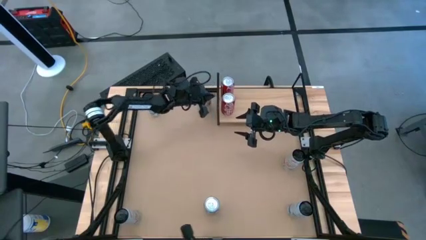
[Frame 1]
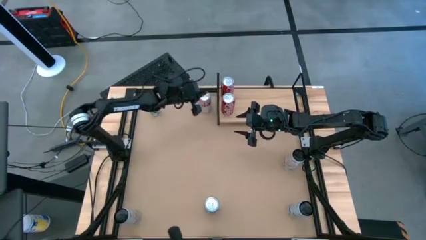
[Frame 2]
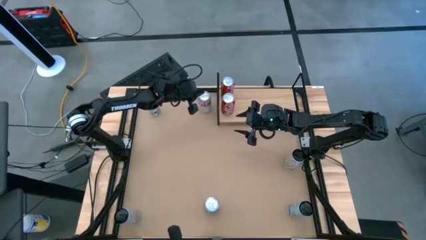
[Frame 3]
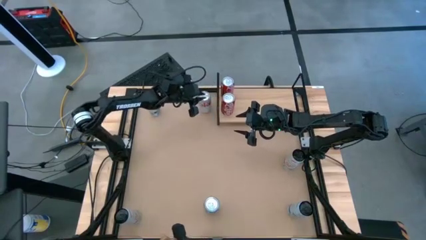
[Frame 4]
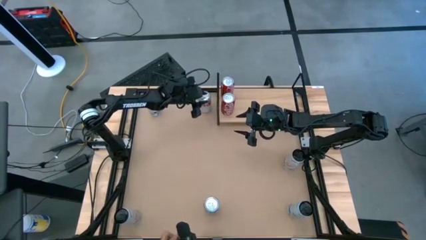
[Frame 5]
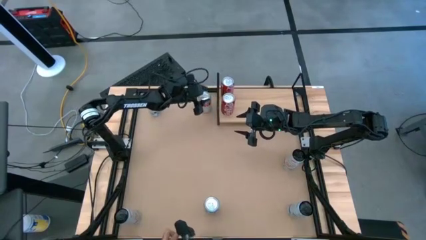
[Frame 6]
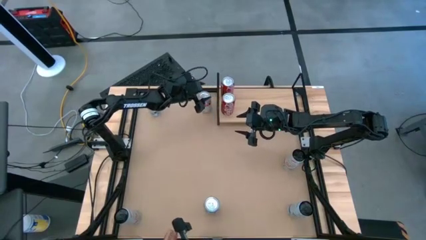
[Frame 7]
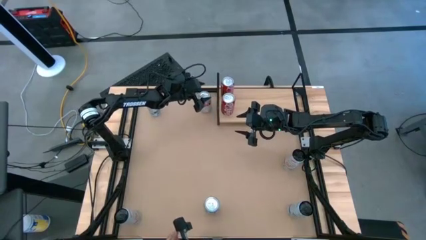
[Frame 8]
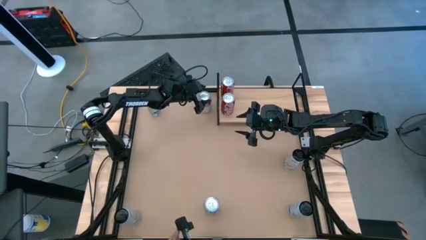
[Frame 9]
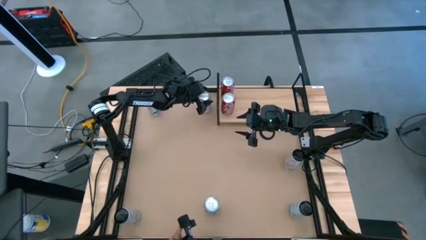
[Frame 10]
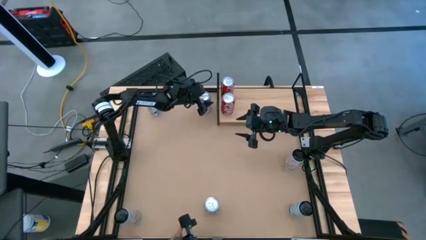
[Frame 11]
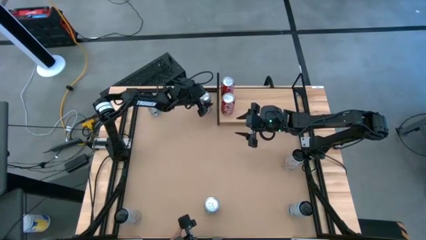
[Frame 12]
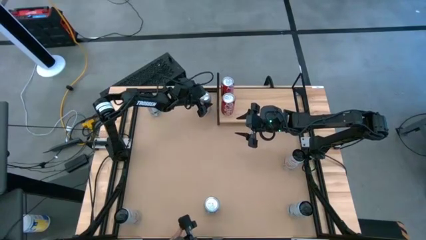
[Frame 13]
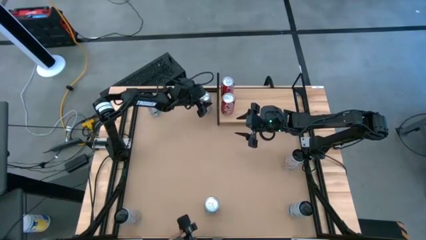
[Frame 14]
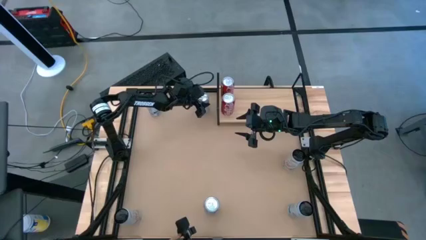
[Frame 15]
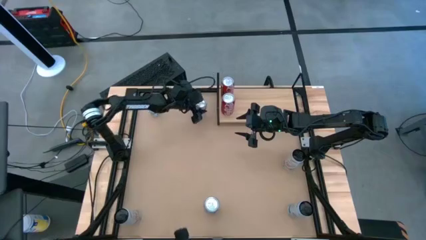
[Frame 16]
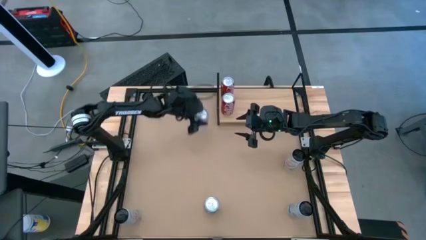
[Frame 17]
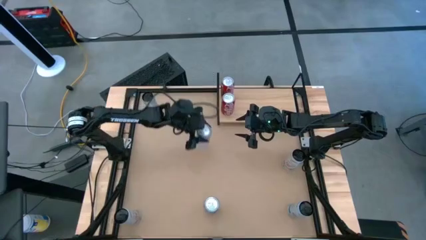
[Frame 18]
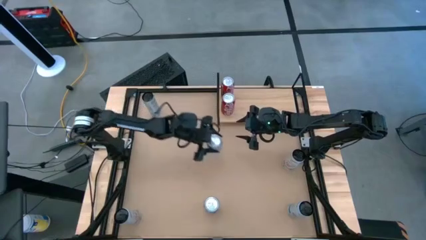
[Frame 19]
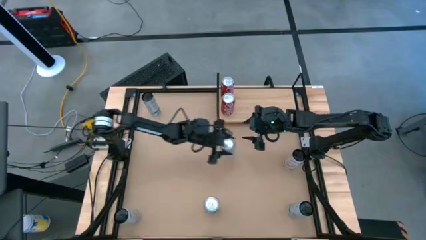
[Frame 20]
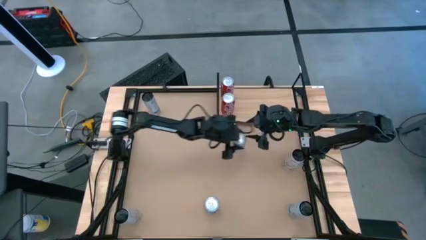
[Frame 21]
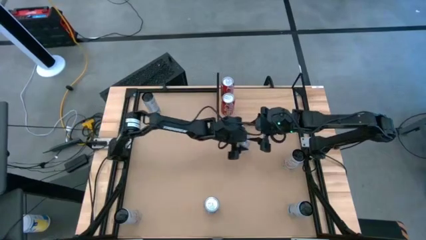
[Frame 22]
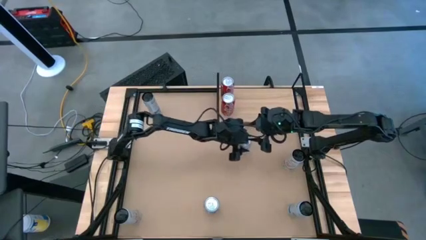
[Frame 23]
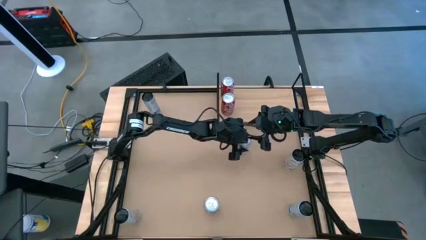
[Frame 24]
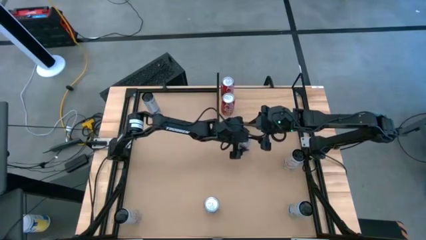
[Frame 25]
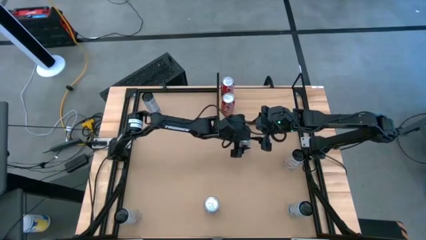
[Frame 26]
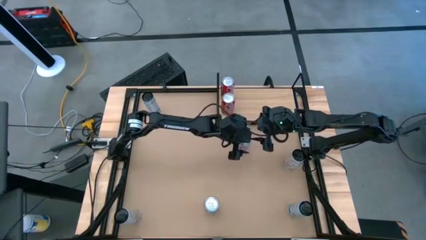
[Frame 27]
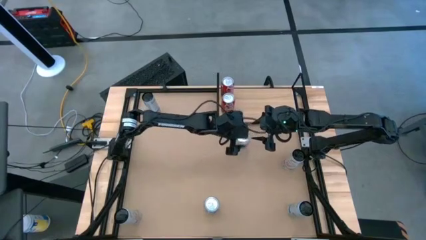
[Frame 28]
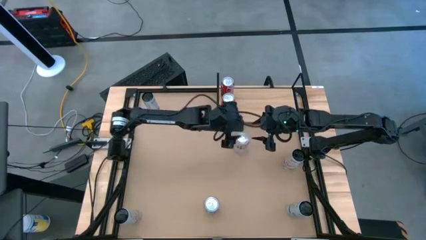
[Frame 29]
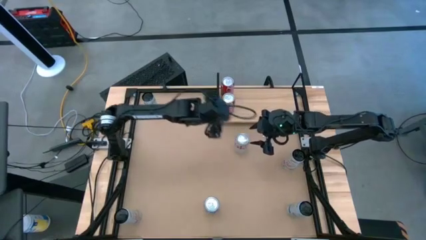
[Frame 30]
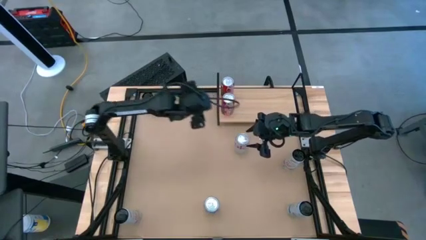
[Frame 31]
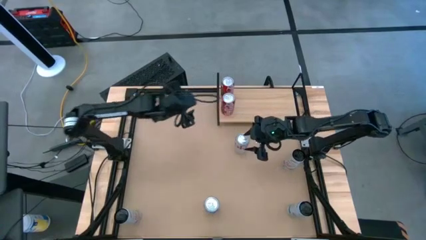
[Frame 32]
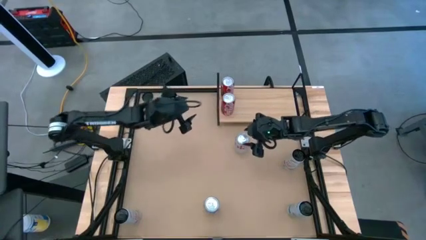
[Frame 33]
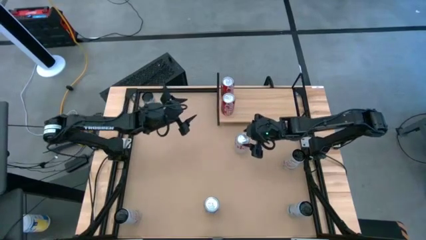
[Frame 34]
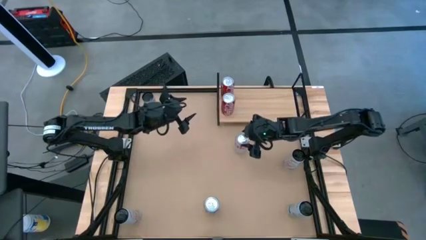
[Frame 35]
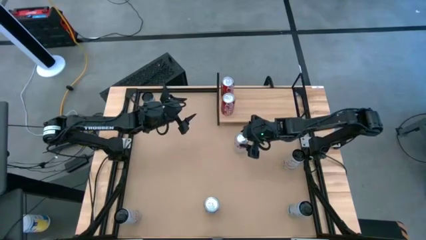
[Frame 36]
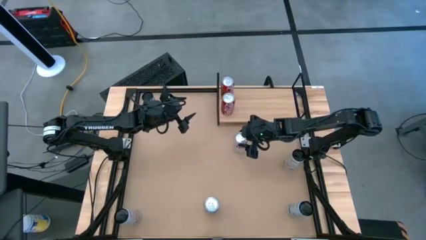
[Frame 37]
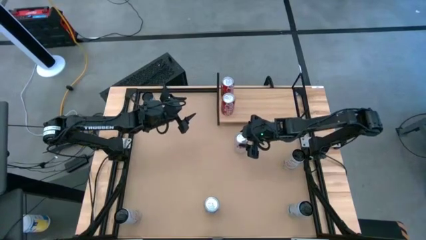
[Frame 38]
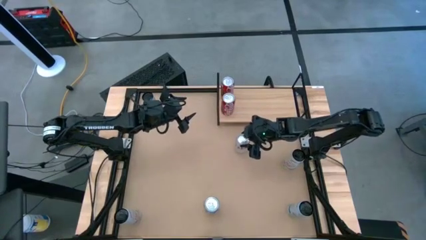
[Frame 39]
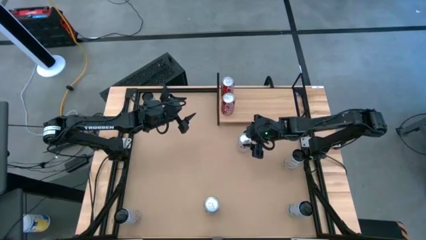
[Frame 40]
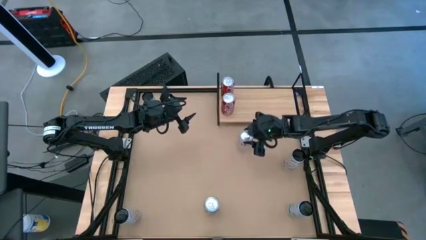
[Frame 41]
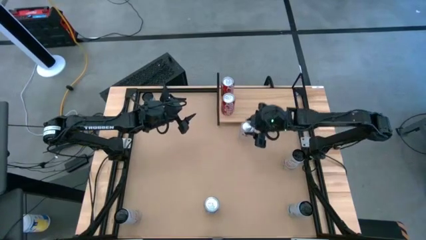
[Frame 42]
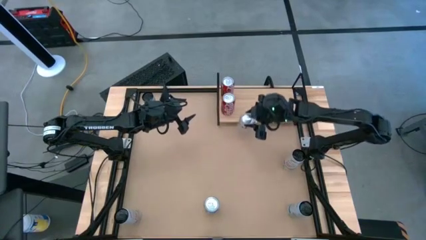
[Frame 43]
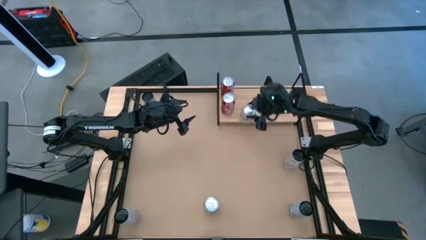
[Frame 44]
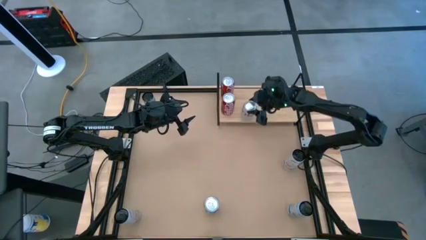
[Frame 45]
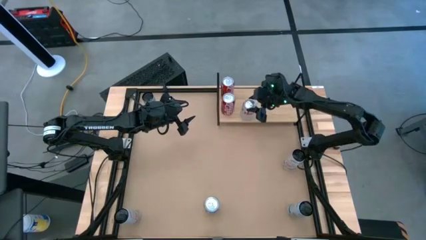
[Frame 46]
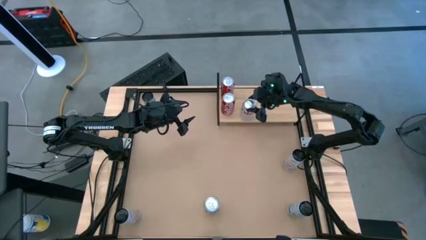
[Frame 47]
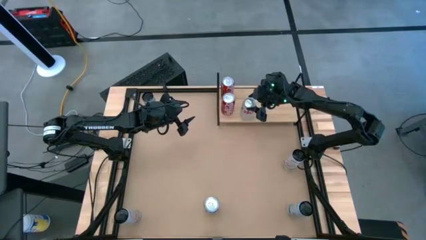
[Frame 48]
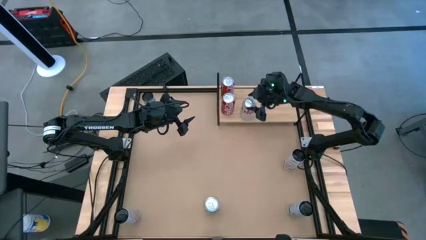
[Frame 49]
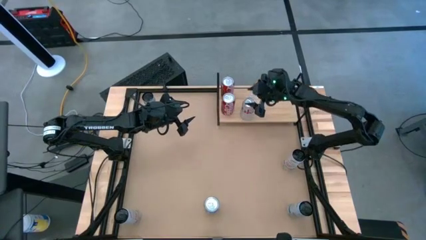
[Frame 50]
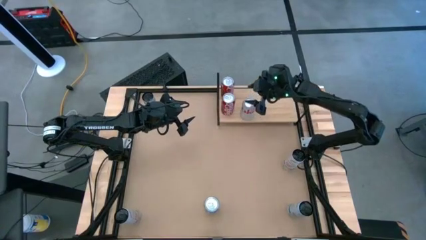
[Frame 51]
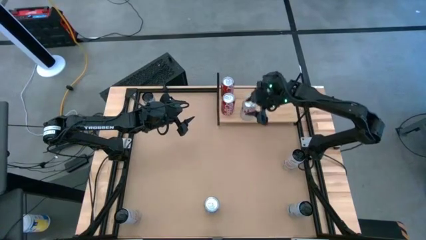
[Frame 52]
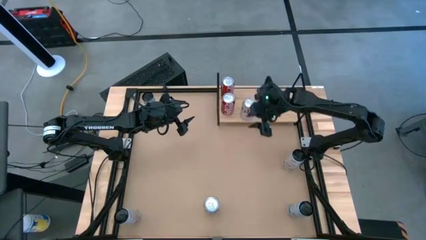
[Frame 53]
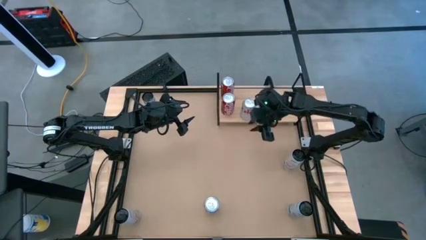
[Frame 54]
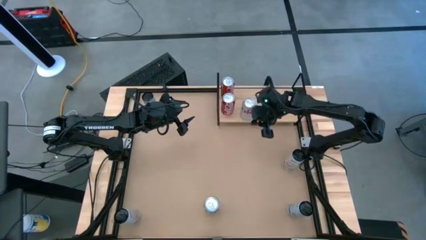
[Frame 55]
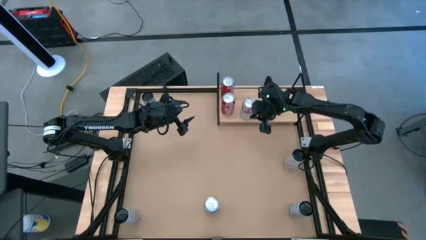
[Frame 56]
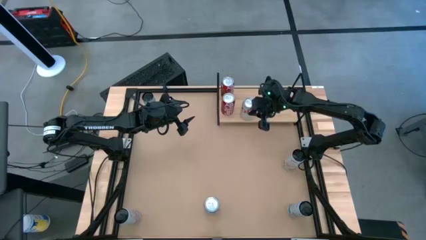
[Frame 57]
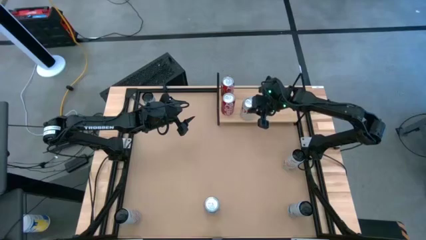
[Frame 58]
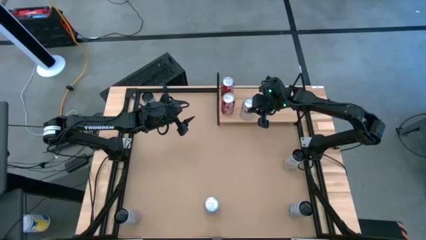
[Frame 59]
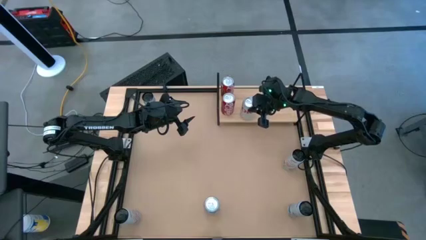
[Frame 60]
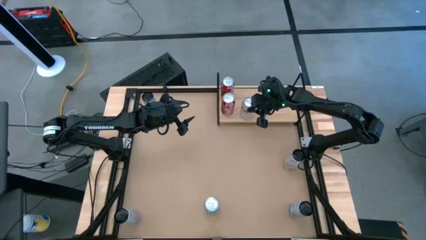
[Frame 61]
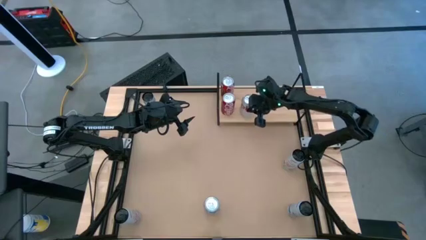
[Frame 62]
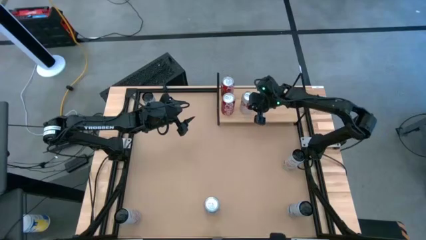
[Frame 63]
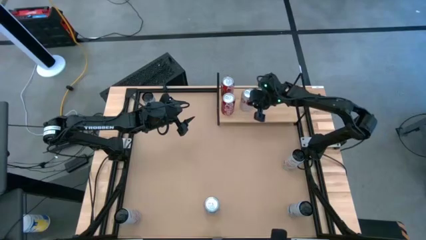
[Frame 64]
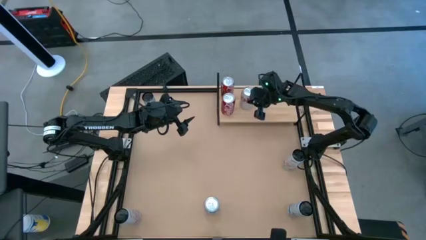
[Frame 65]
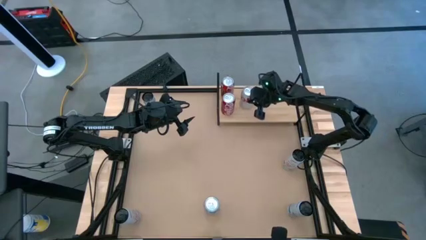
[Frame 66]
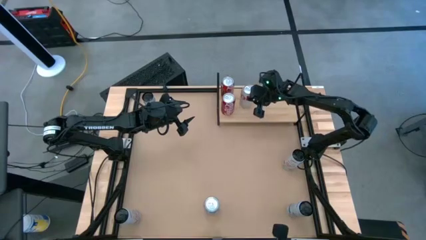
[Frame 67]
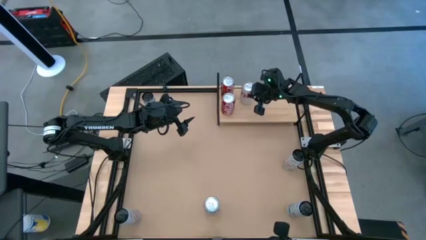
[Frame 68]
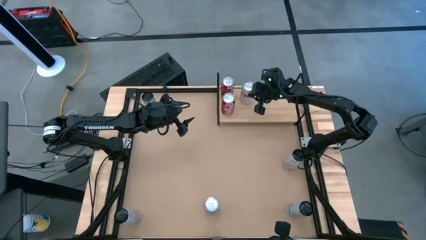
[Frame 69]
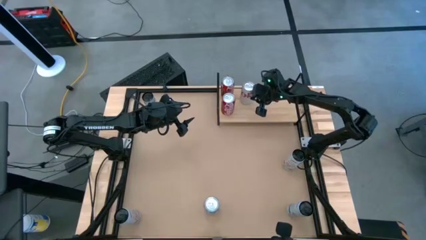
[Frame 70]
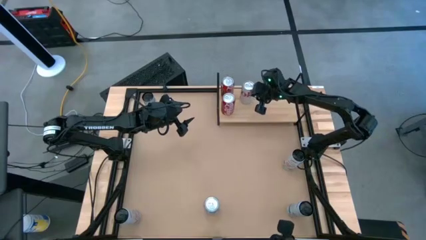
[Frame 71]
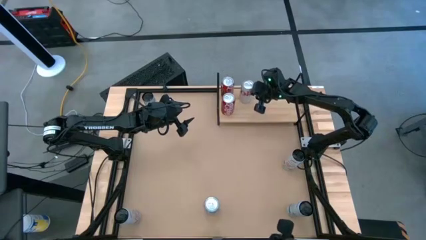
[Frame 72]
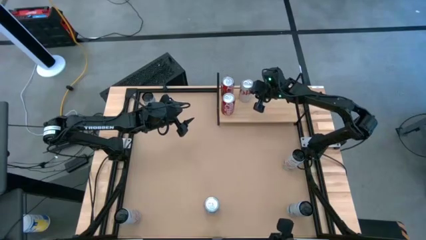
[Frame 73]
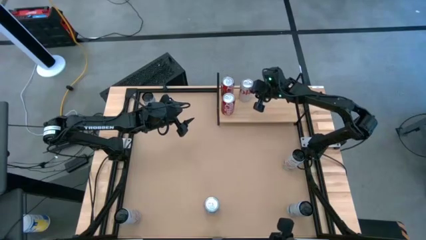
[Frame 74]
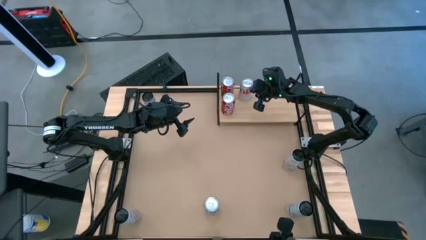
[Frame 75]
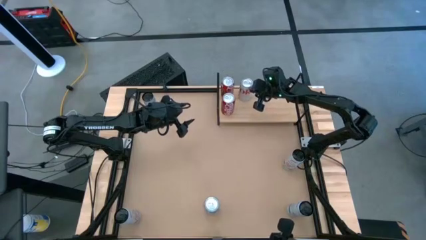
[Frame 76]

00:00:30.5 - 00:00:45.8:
Task: Place canned beverage on shelf
Put the top silver soda can on the shelf
